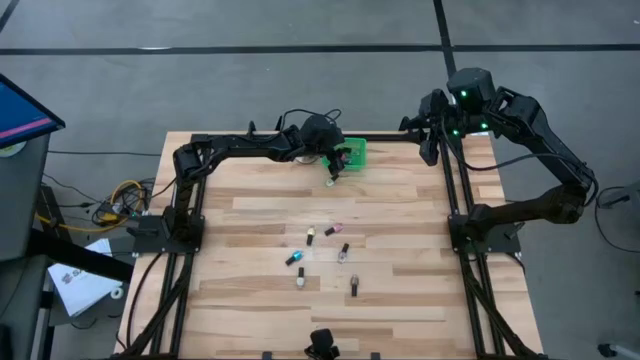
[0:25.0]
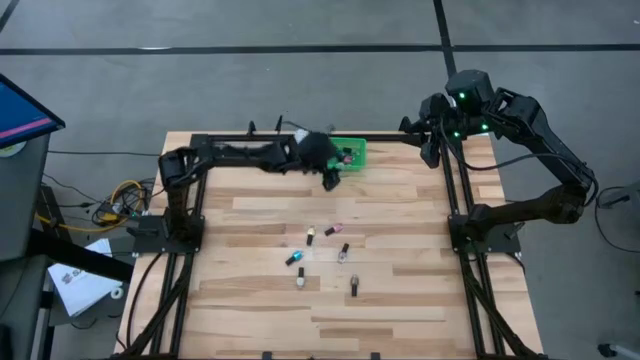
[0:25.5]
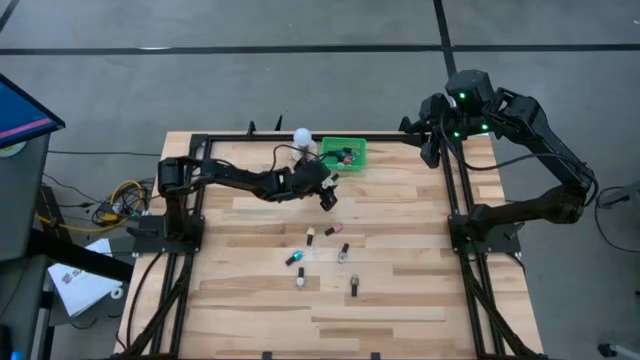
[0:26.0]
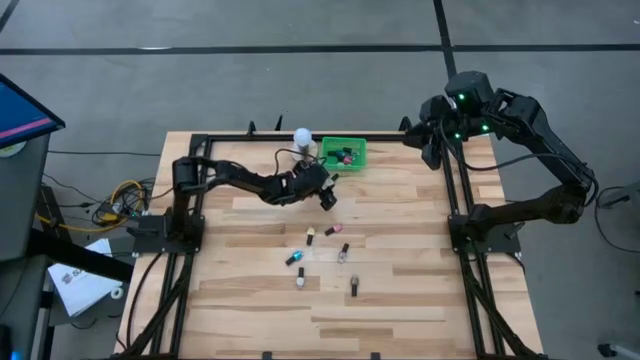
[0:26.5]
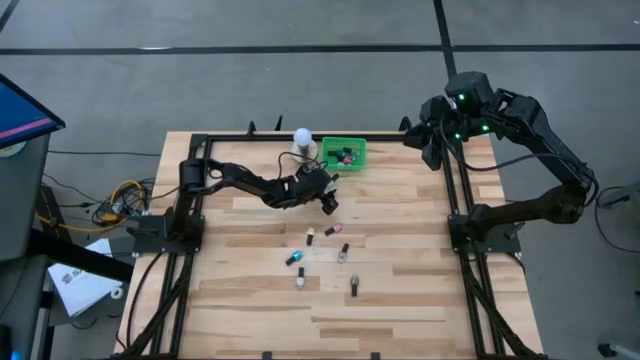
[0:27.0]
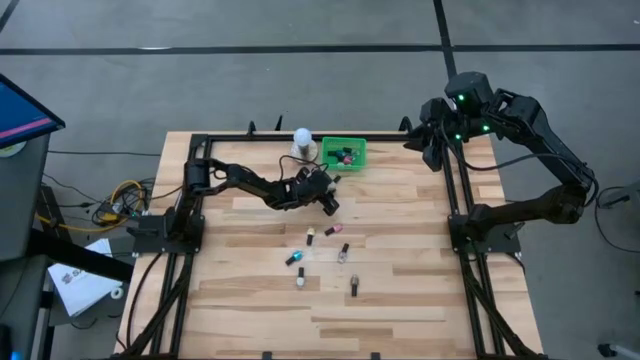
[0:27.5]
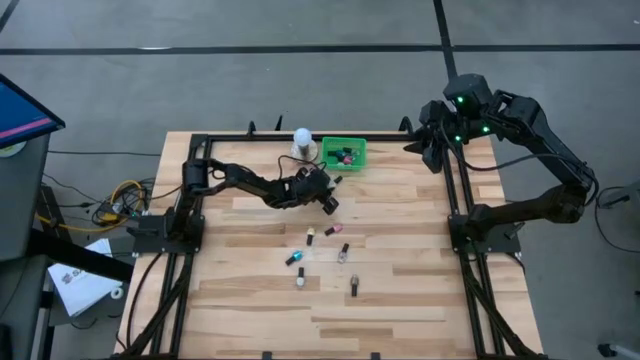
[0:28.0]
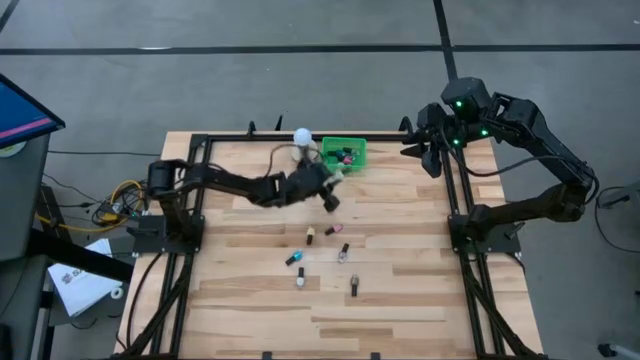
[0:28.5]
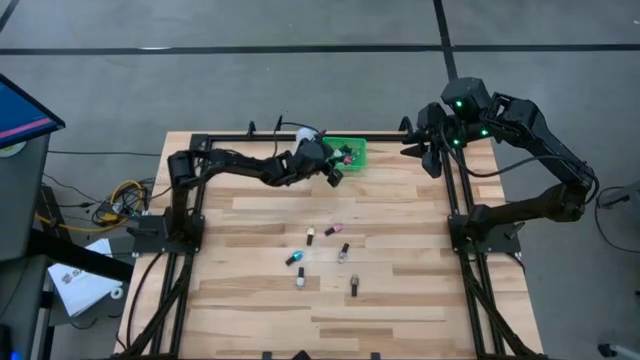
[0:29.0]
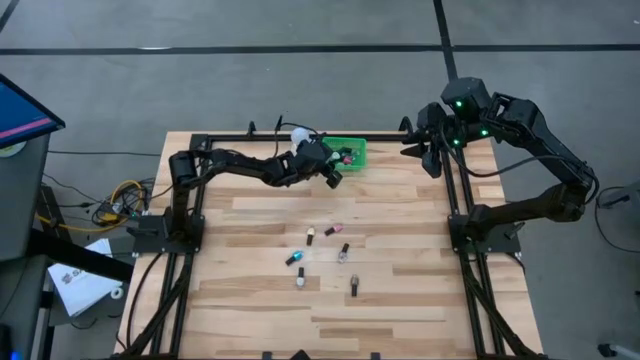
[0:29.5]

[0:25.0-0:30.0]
Task: Pick & Place Nail Polish
Put the white nail polish bottle into the green basket

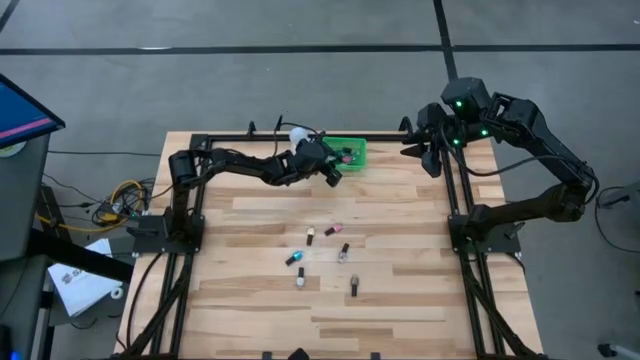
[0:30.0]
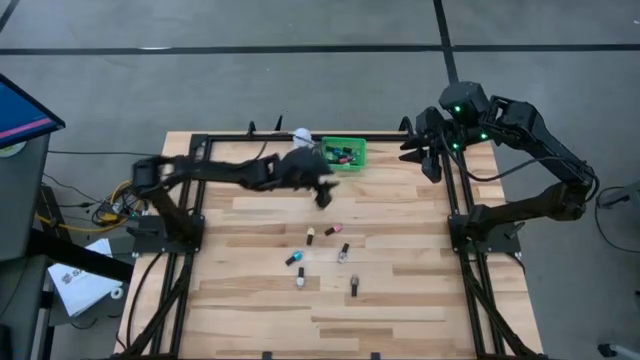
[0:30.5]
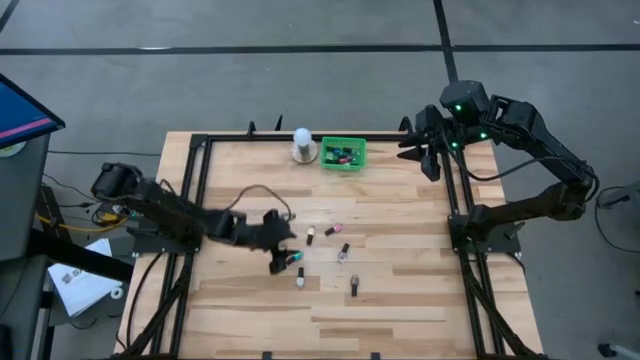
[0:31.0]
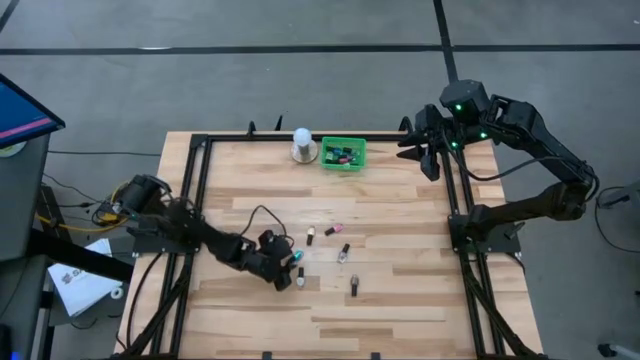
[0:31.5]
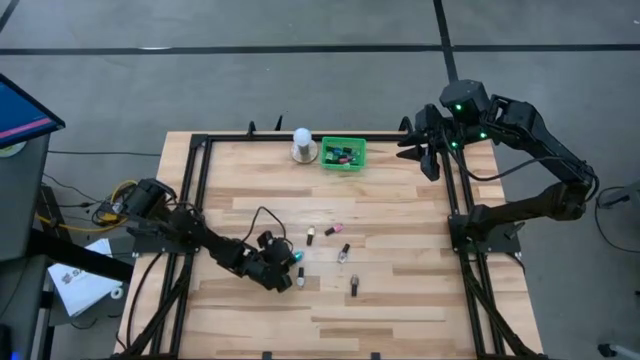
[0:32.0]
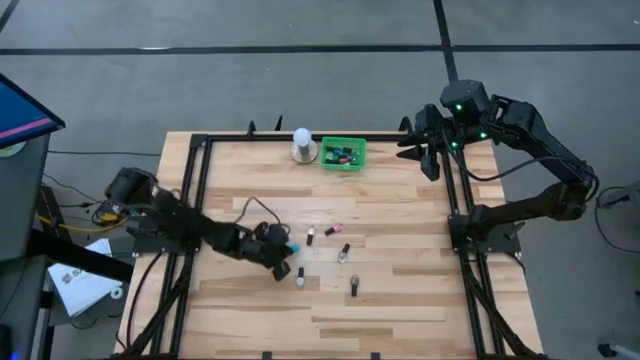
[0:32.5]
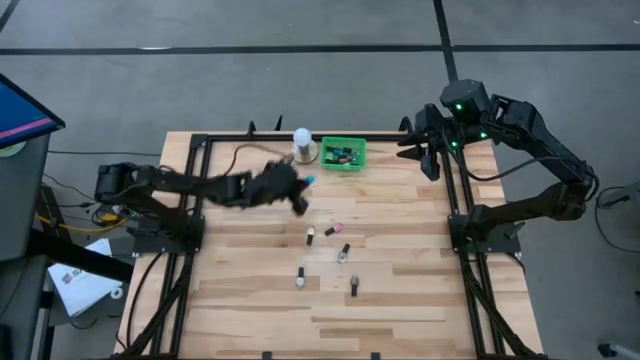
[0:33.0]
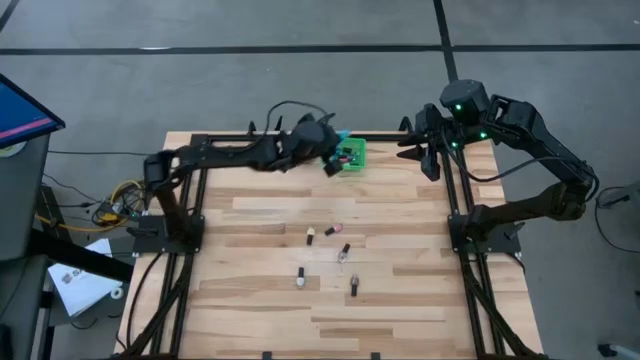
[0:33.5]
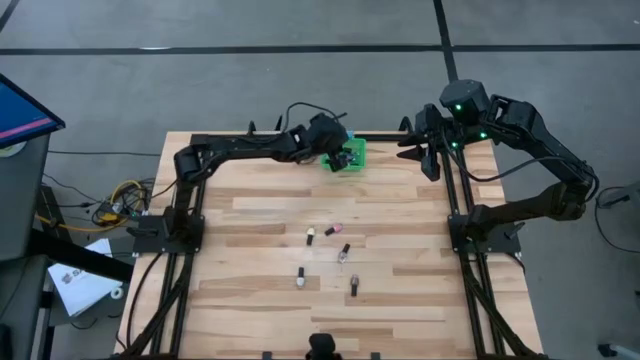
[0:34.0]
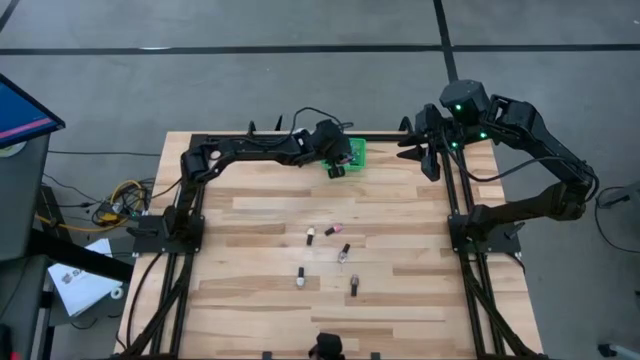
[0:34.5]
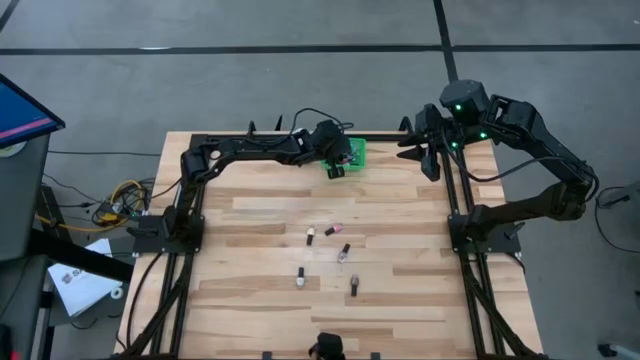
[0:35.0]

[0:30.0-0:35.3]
Put the light blue nail polish bottle into the green basket

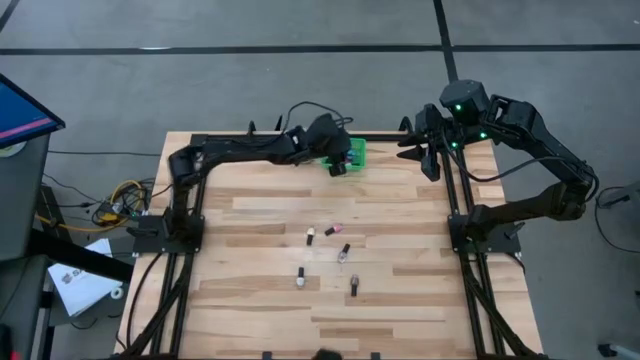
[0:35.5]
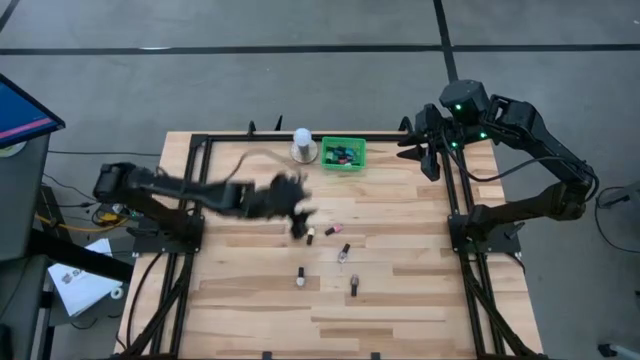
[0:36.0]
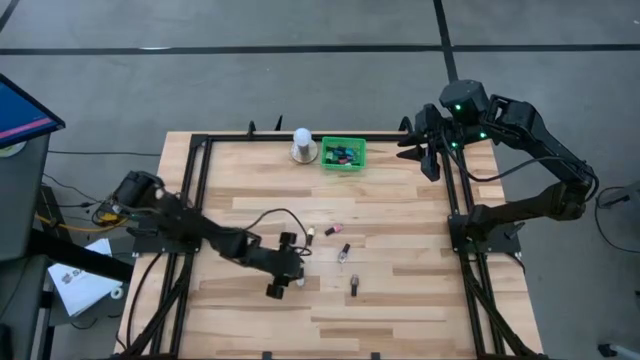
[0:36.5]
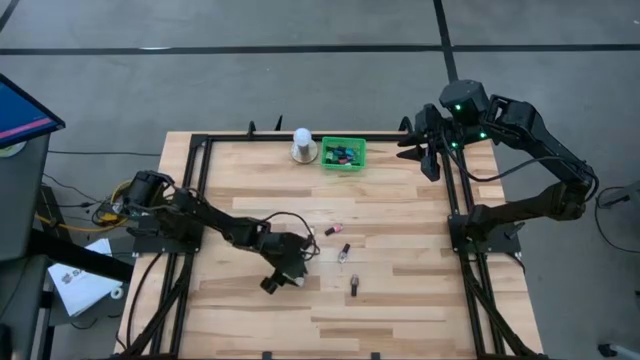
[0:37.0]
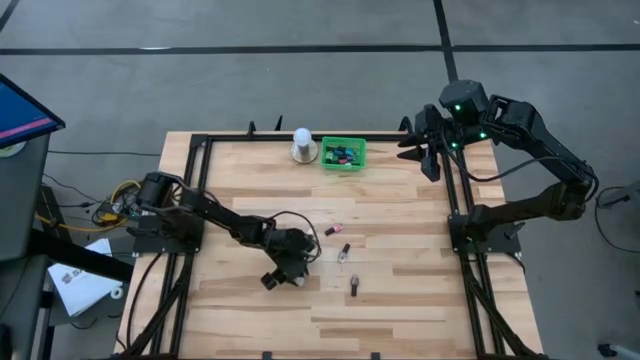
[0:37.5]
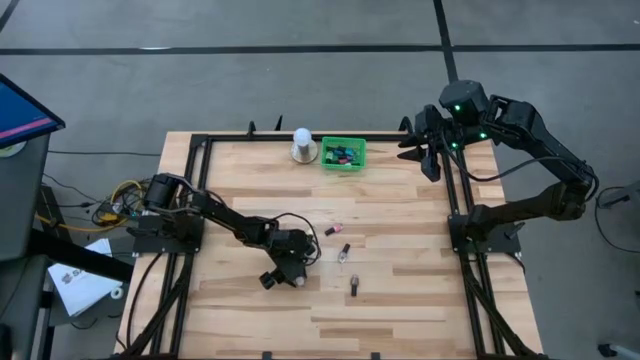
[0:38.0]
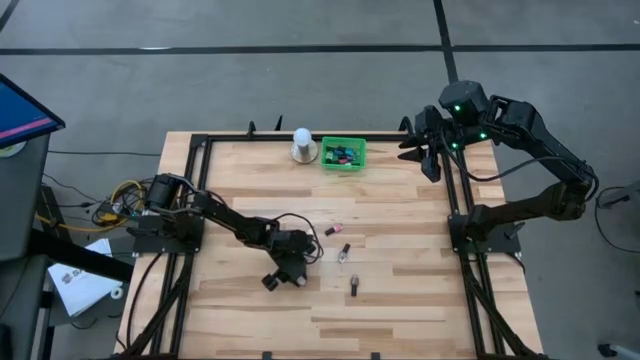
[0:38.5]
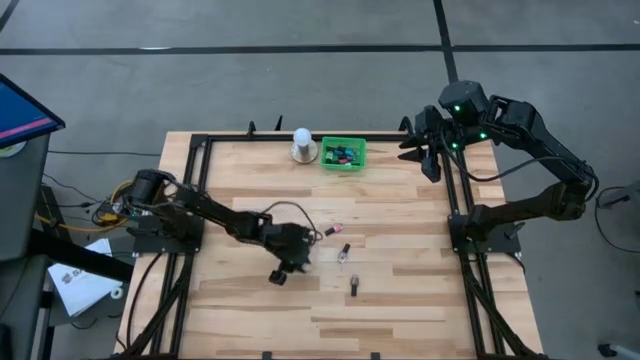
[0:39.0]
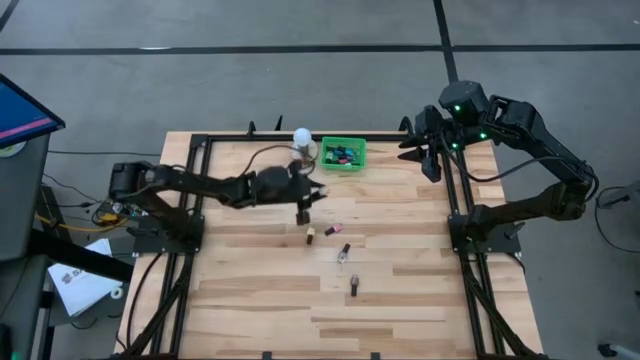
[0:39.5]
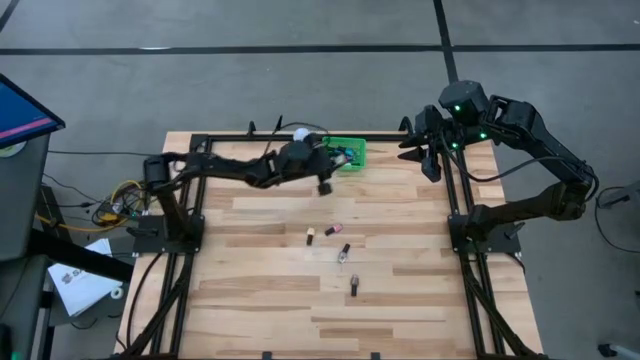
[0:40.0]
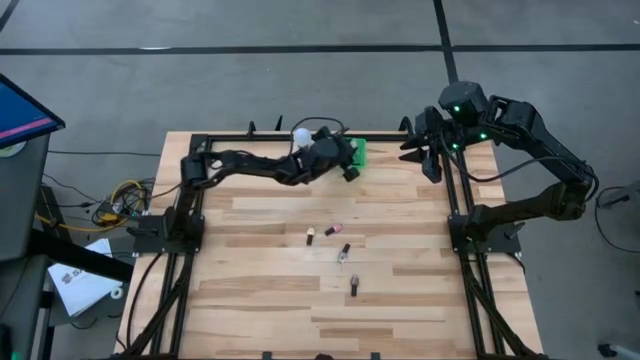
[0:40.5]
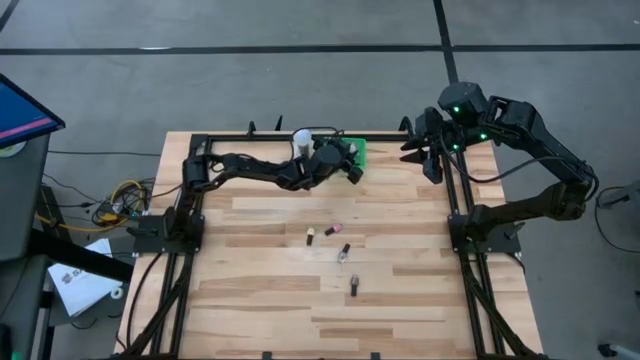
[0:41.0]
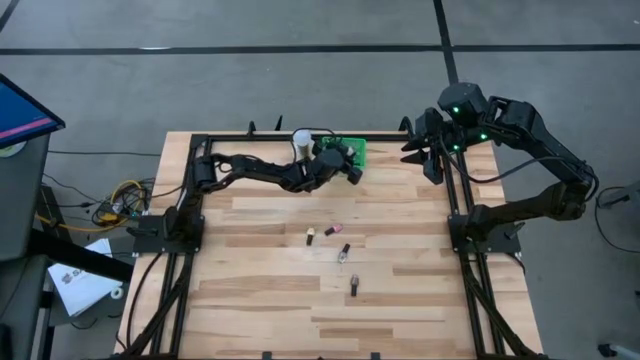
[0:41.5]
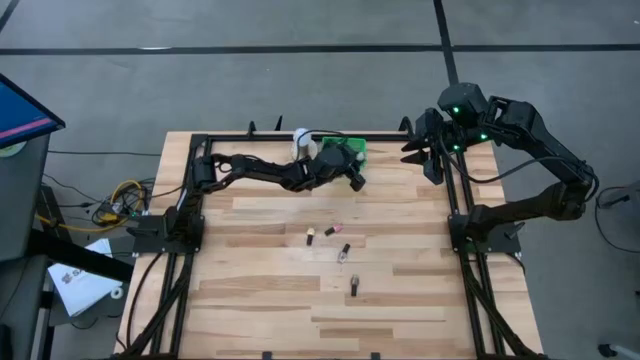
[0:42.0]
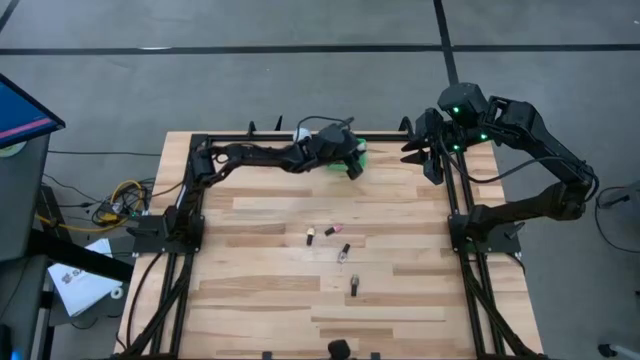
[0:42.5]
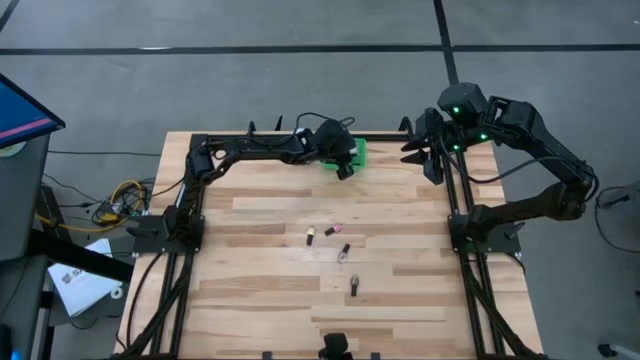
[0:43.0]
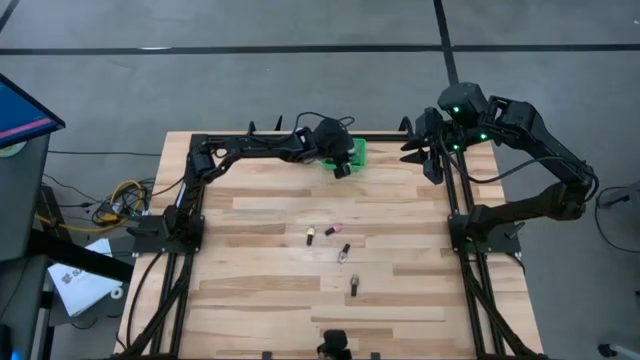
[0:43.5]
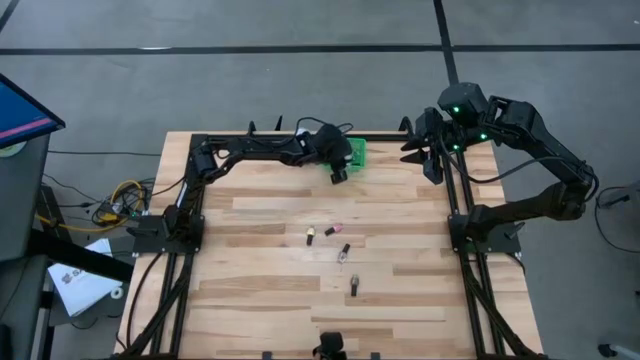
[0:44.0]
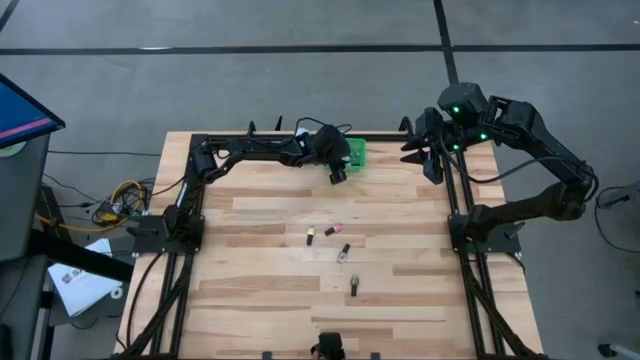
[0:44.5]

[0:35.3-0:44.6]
Put the white nail polish bottle into the green basket

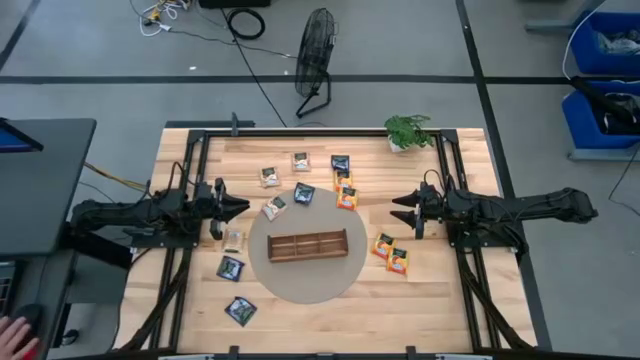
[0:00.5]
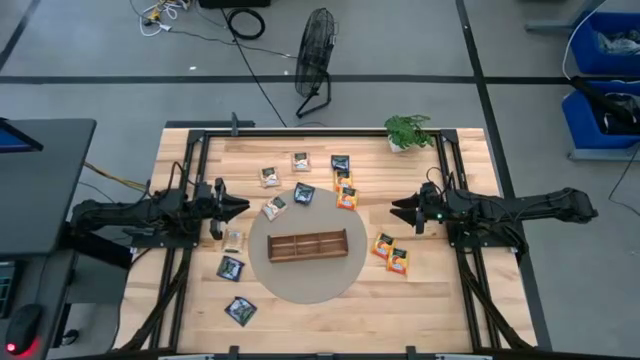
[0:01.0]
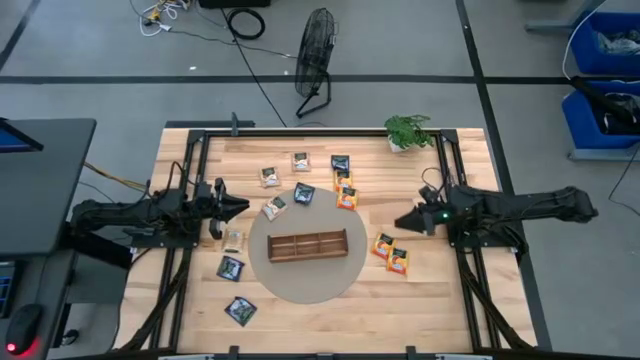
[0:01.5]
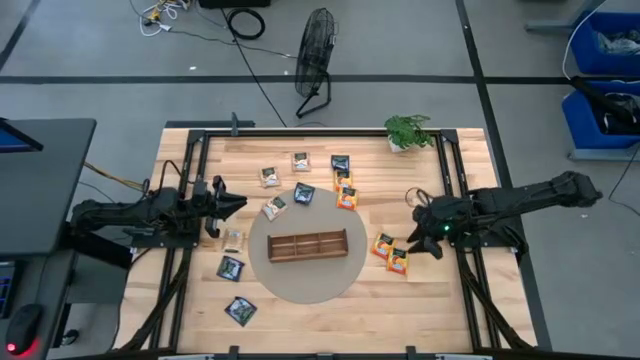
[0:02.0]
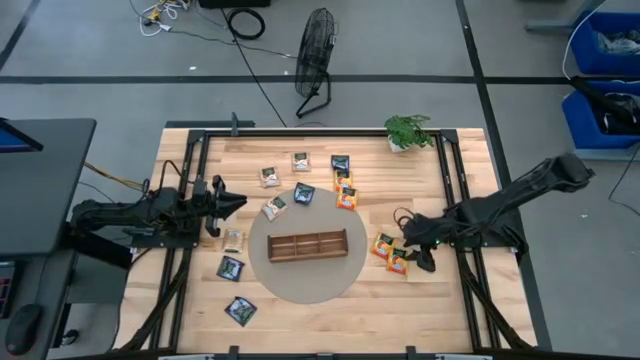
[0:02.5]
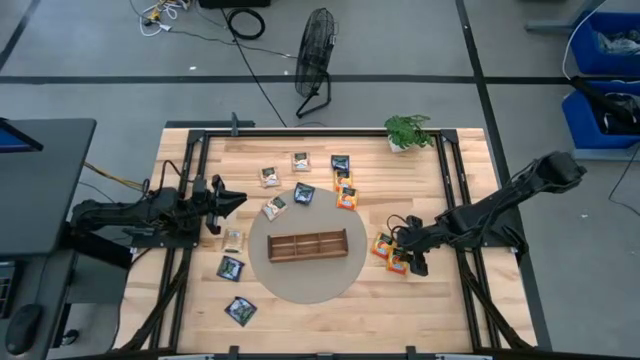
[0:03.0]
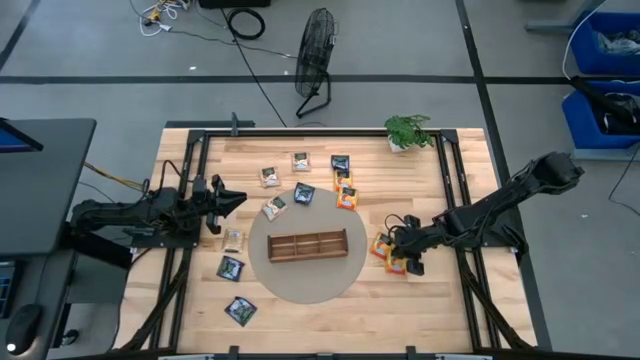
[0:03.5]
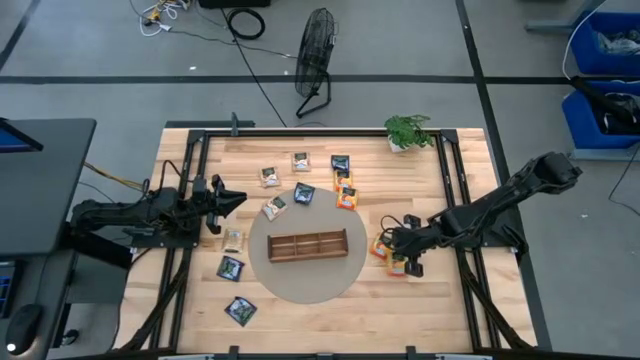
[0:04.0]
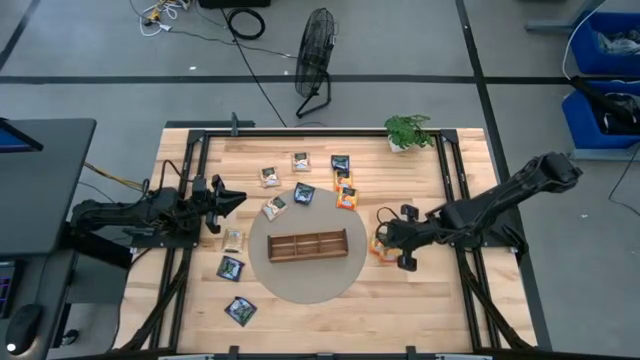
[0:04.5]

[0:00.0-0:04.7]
Task: Pick & Place Tea
Put the orange tea bag into the right section of the wooden organizer
